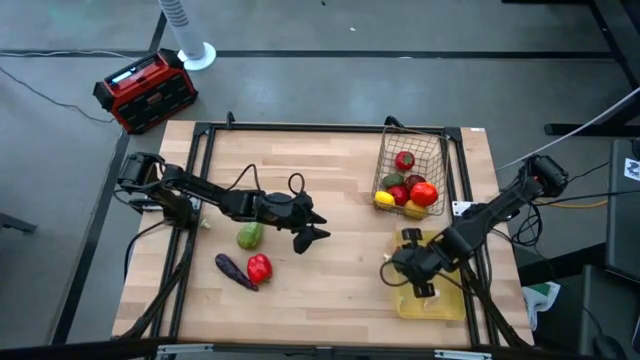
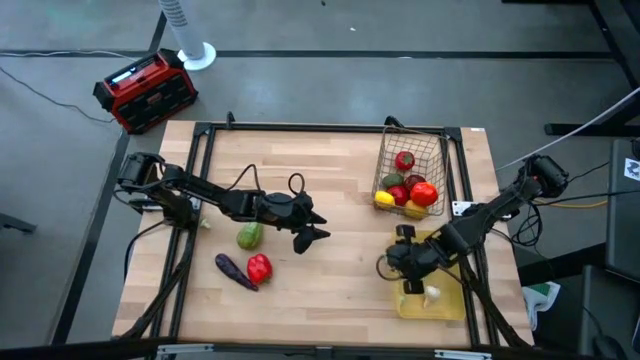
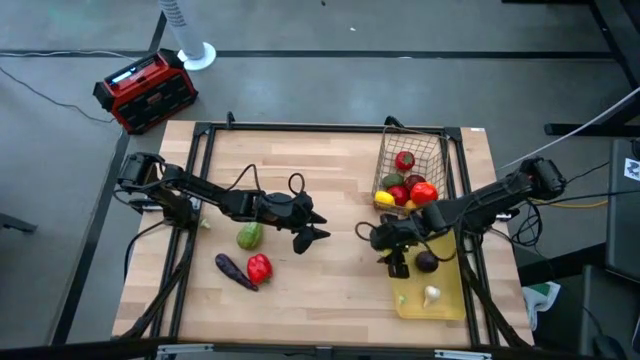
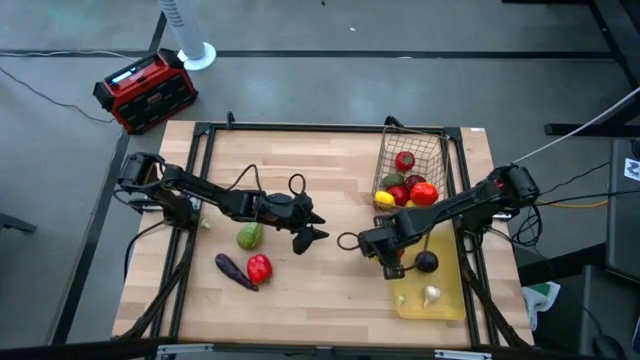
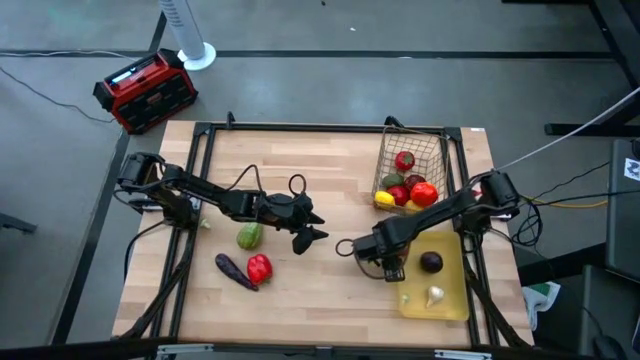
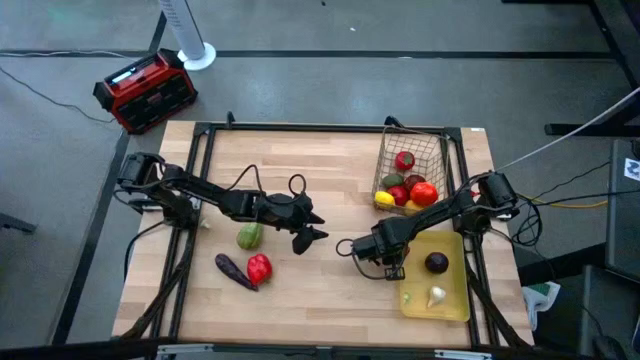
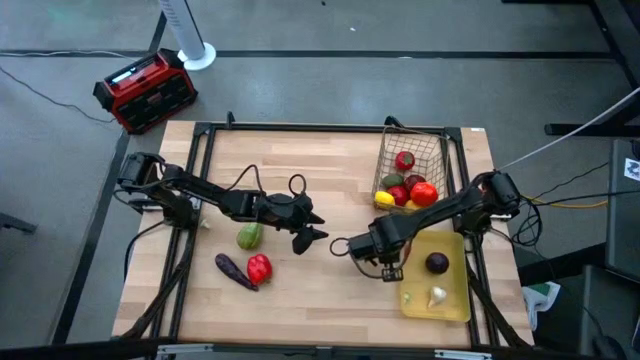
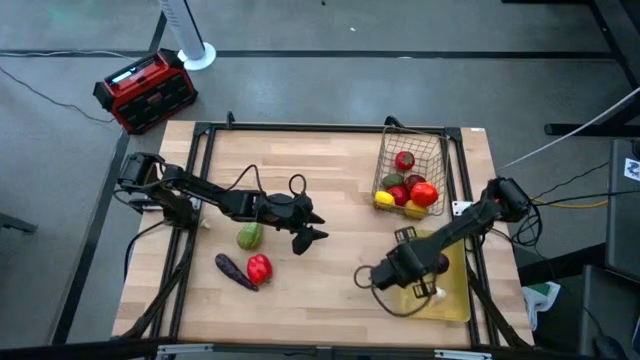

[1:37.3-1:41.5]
Task: Sort produce into baskets
Put the right green mushroom into the yellow bin

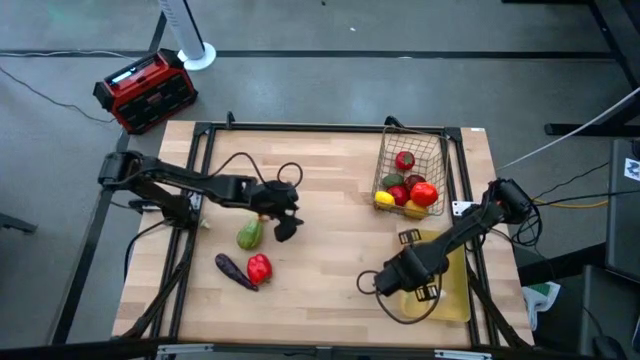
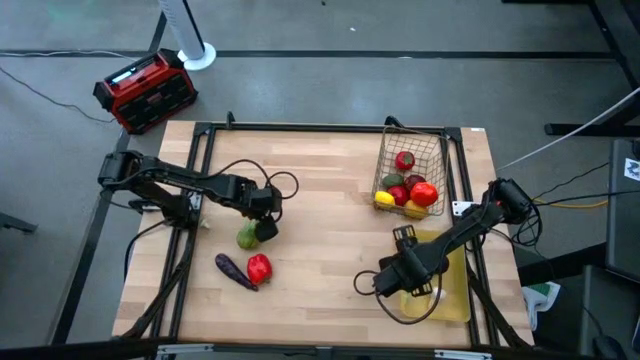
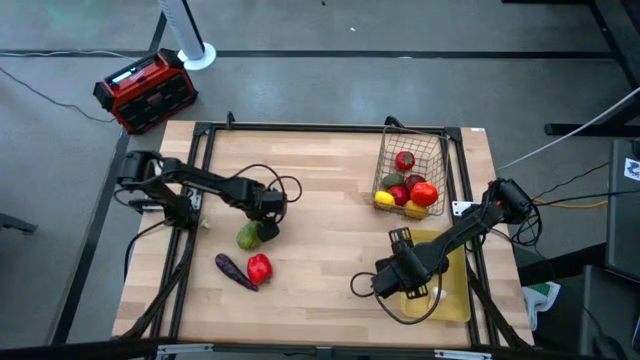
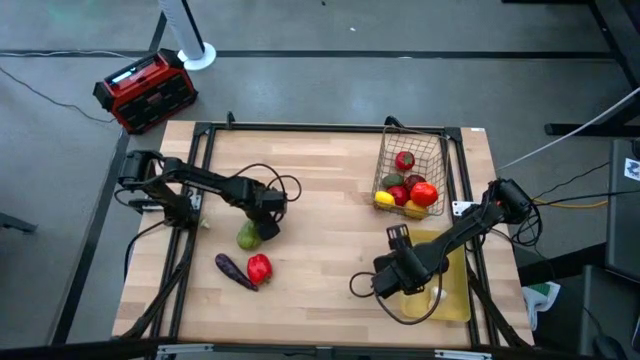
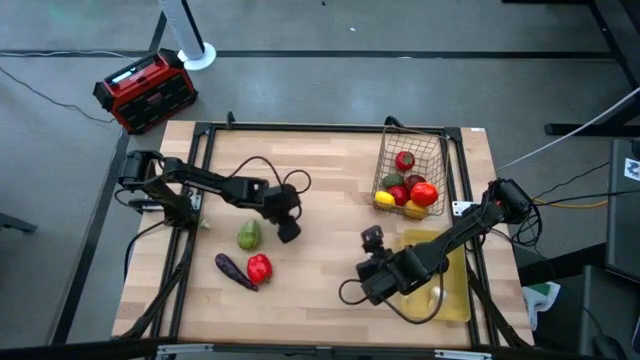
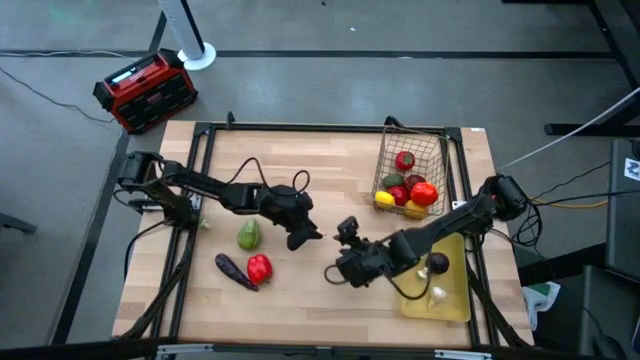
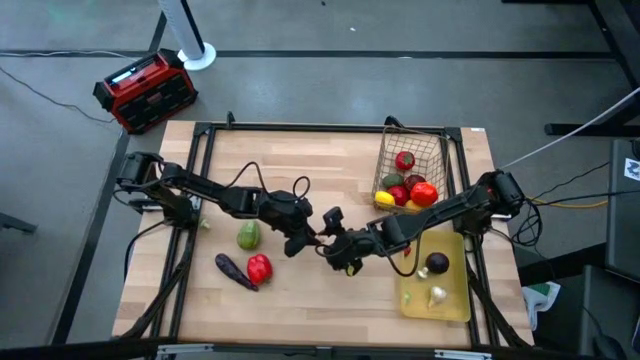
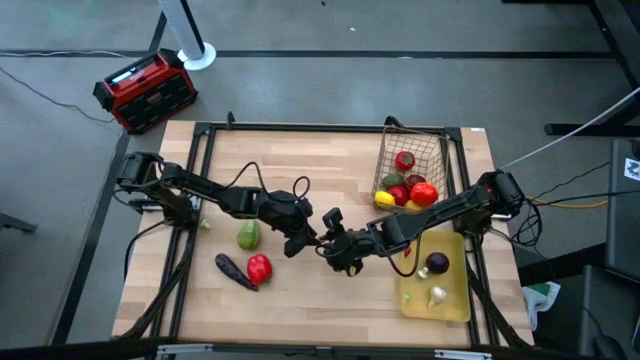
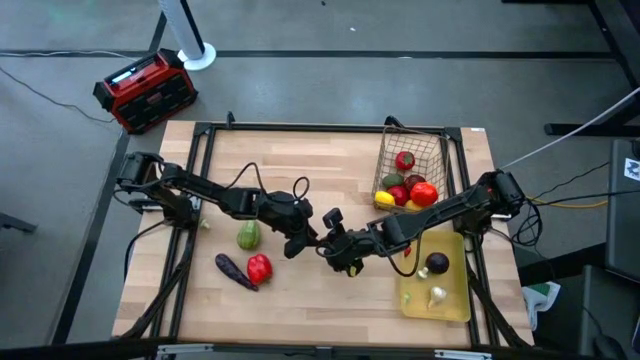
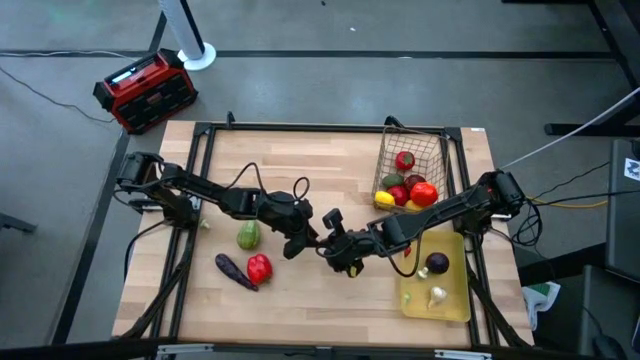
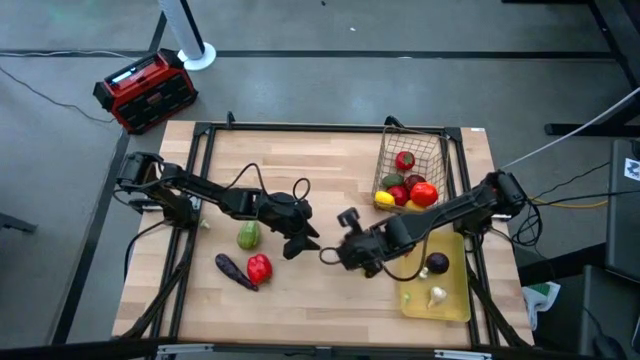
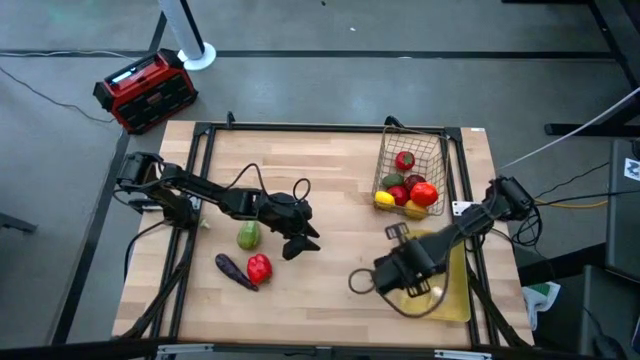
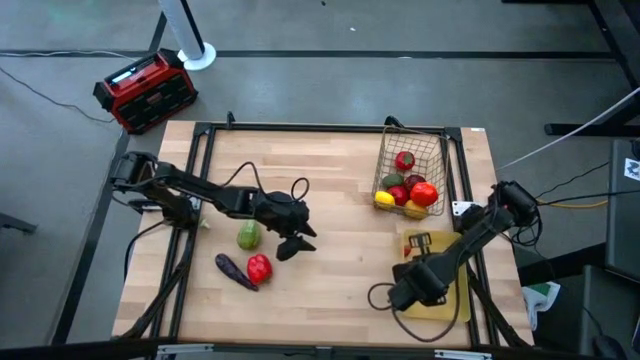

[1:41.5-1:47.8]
Put the red mushroom into the yellow bin

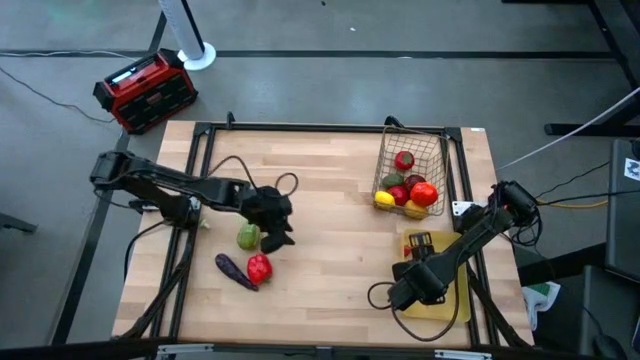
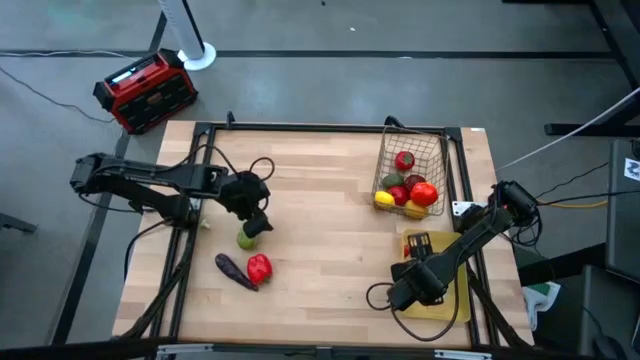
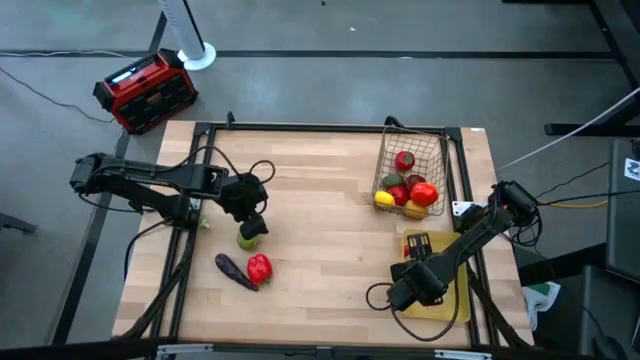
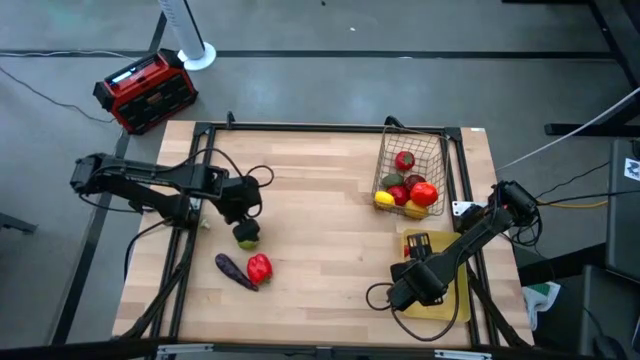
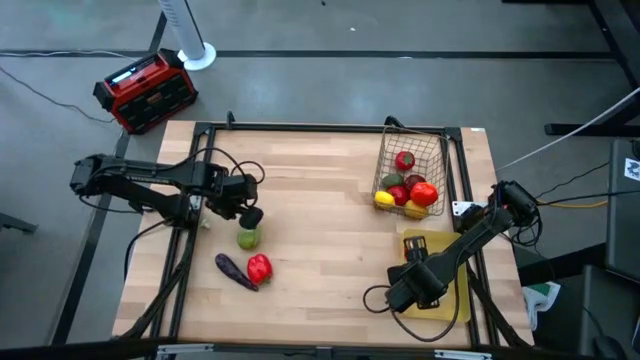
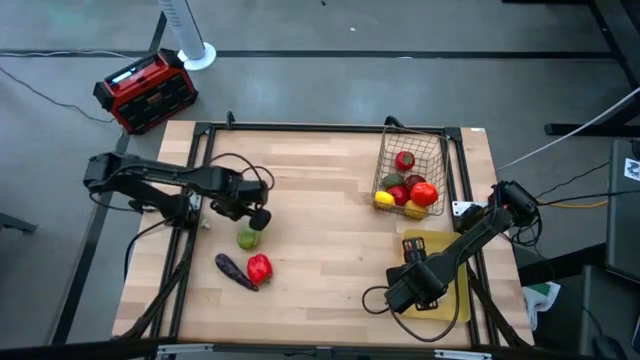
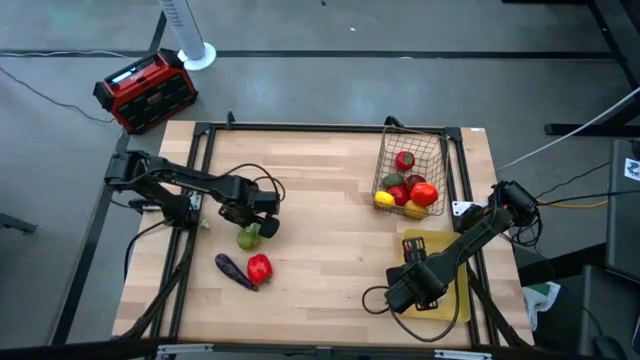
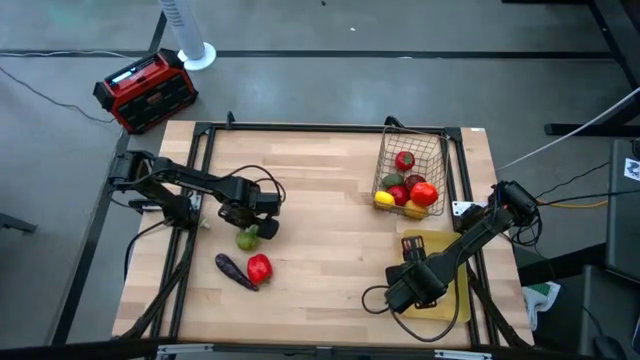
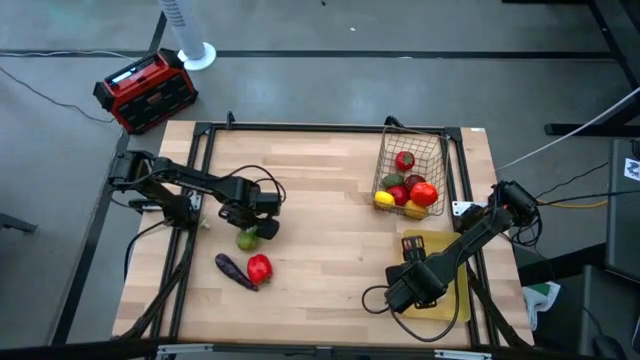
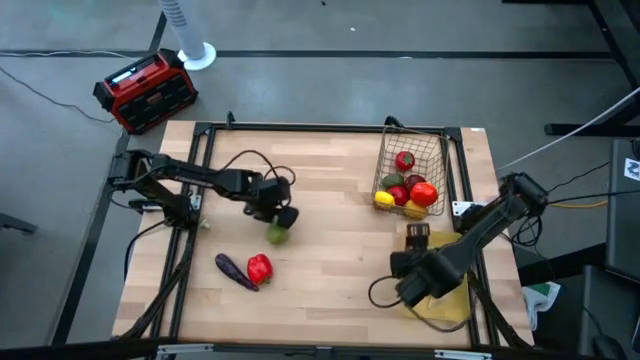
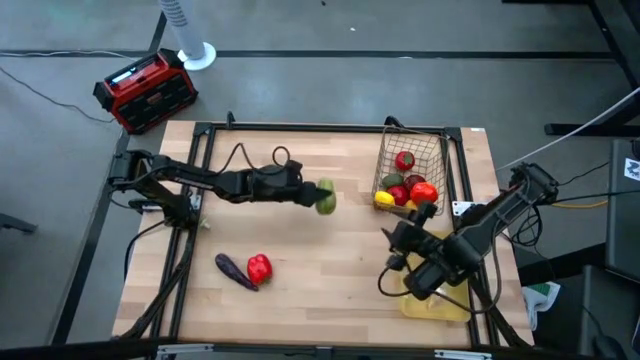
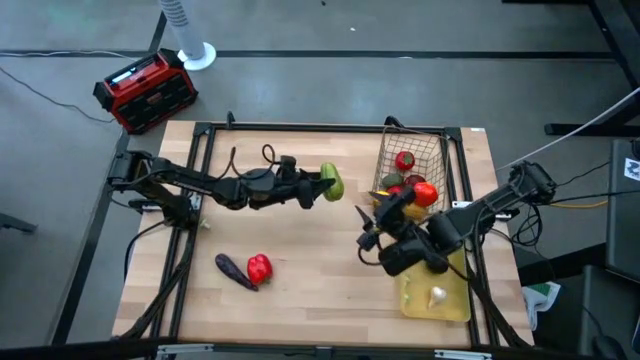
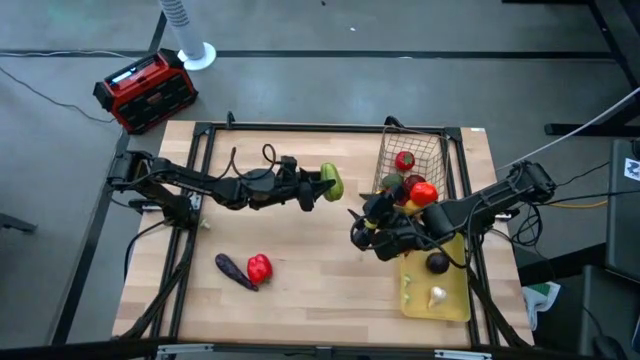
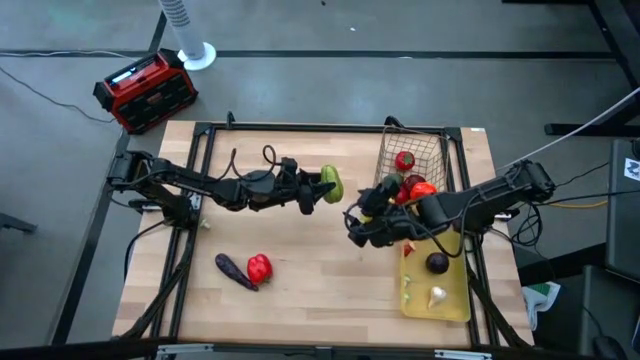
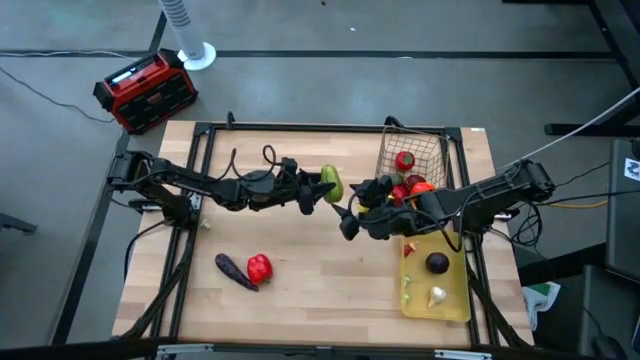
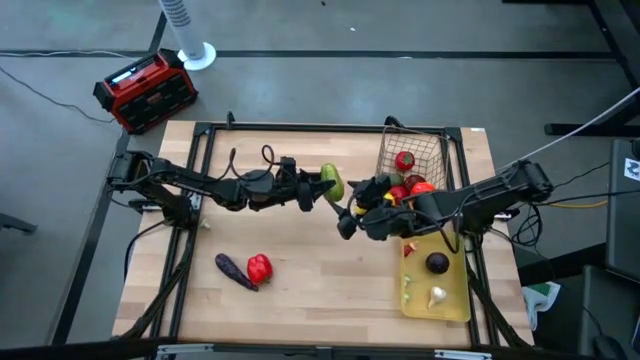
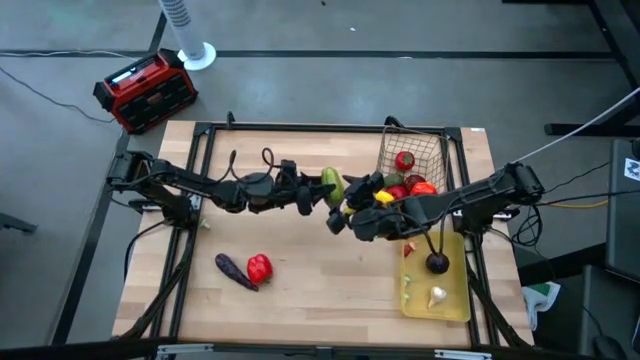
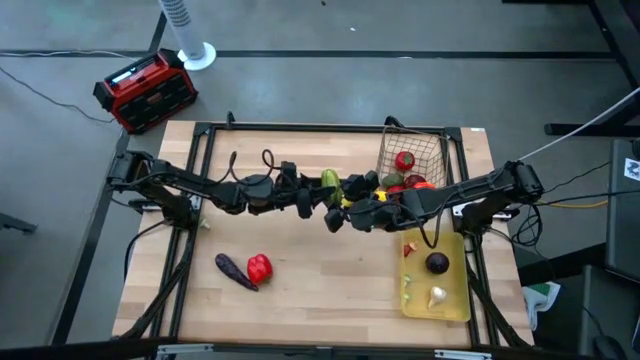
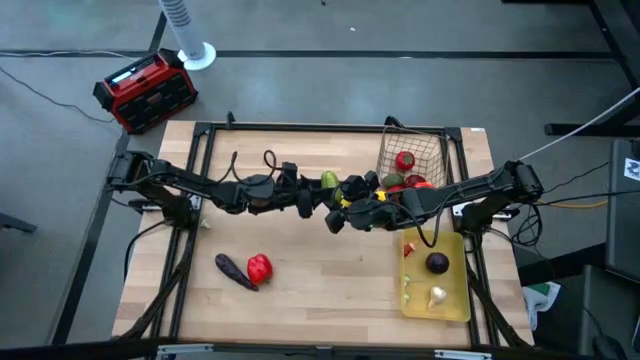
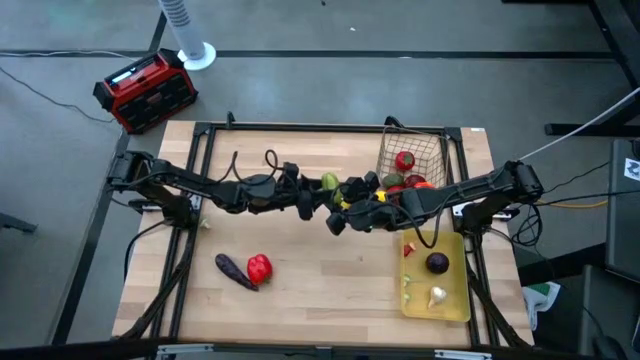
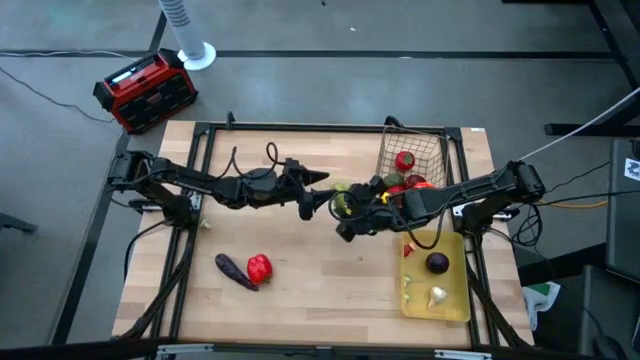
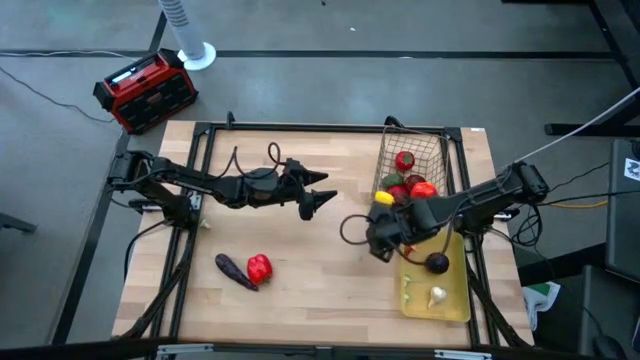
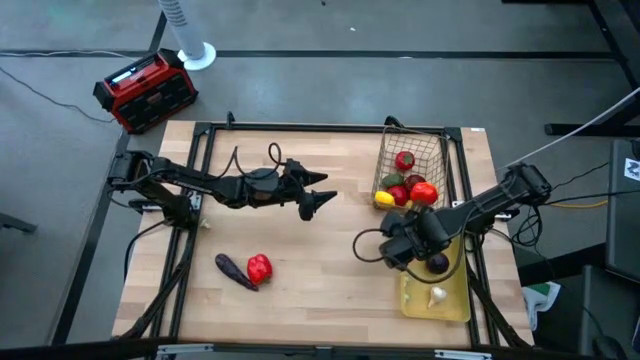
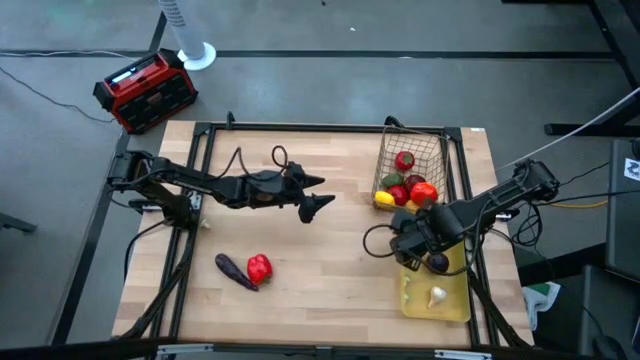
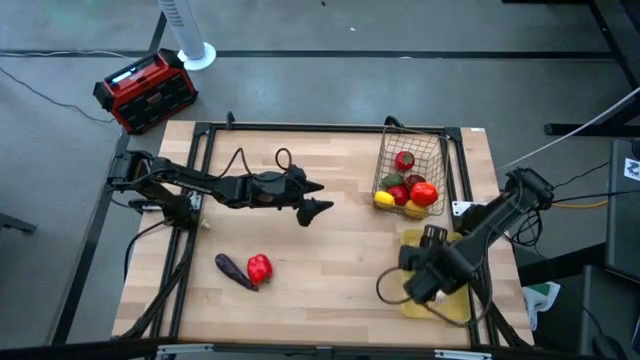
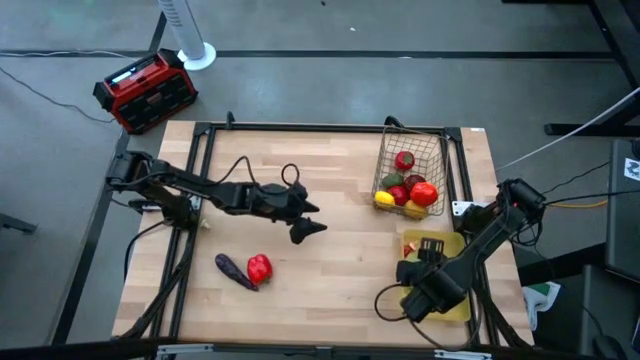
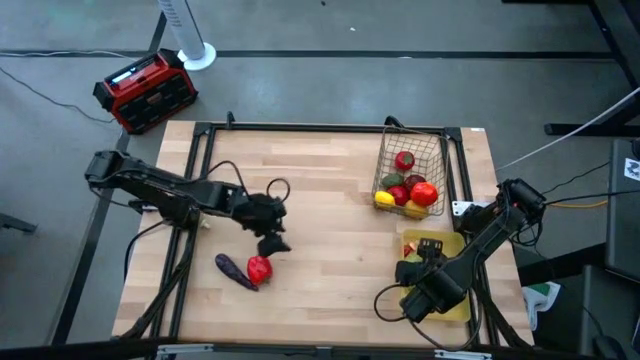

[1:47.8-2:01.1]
Put the chayote into the yellow bin
